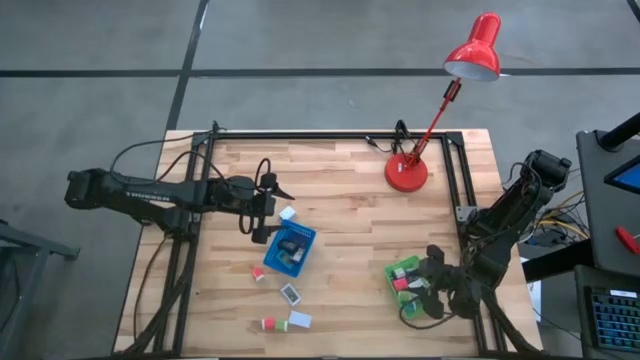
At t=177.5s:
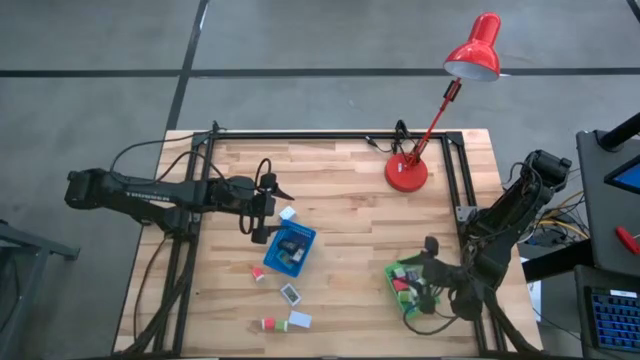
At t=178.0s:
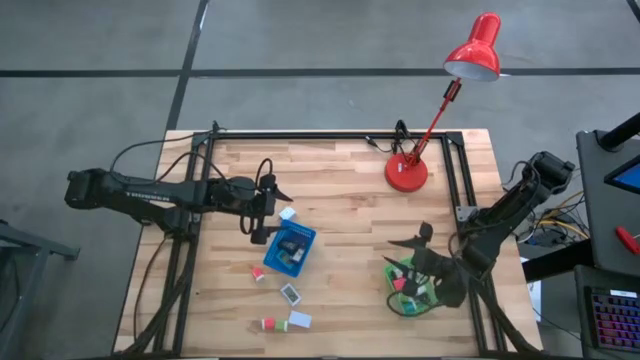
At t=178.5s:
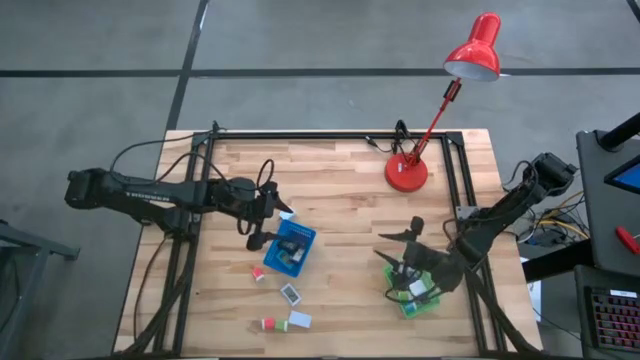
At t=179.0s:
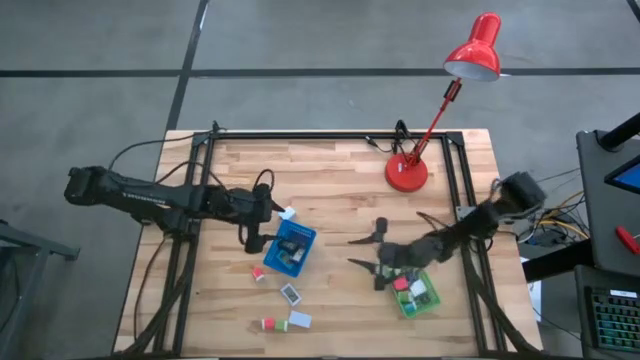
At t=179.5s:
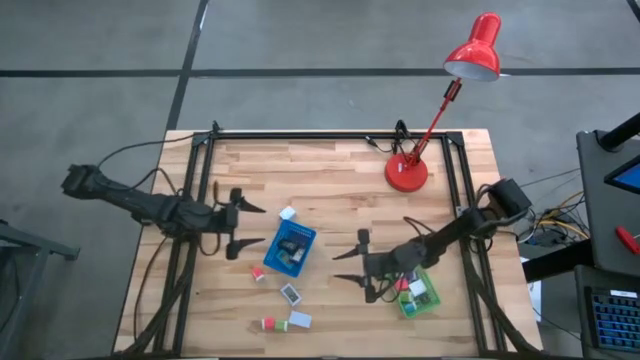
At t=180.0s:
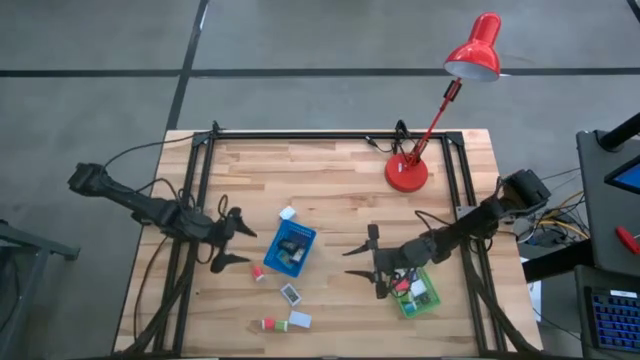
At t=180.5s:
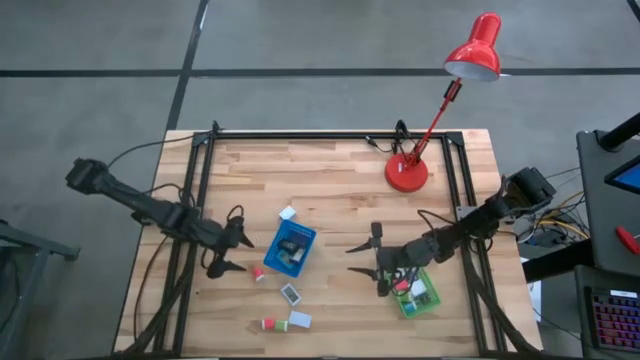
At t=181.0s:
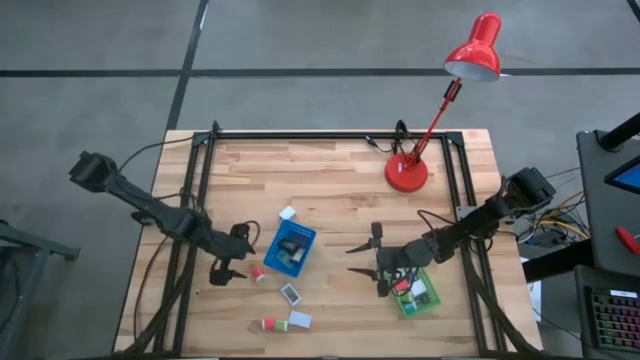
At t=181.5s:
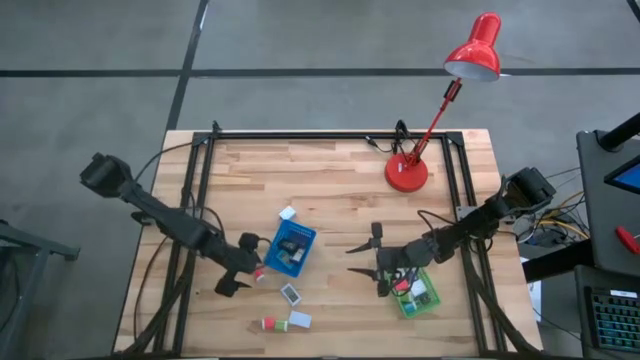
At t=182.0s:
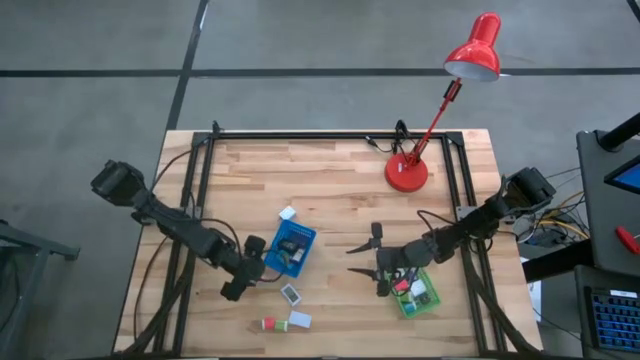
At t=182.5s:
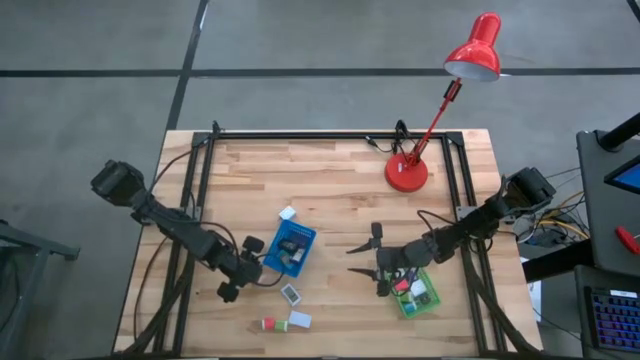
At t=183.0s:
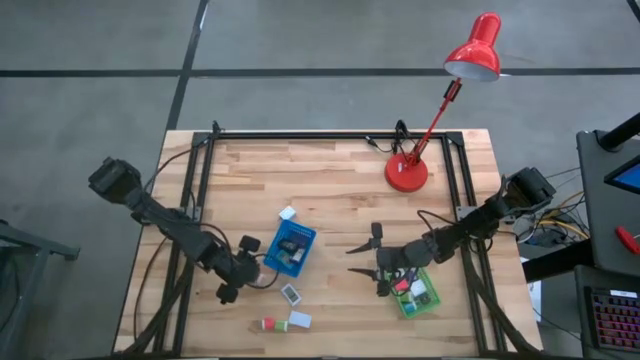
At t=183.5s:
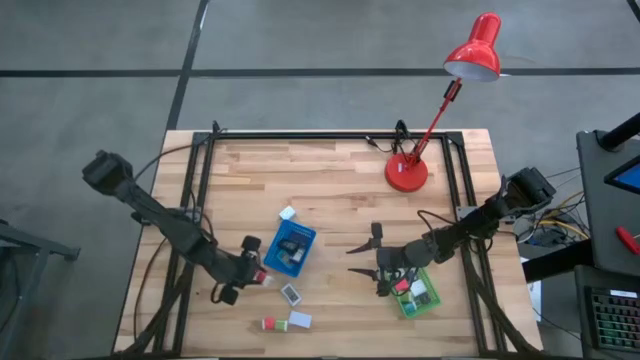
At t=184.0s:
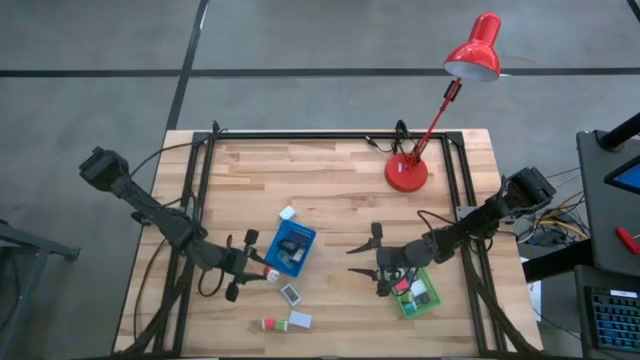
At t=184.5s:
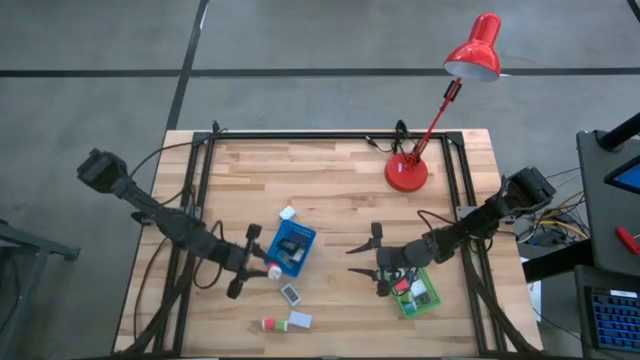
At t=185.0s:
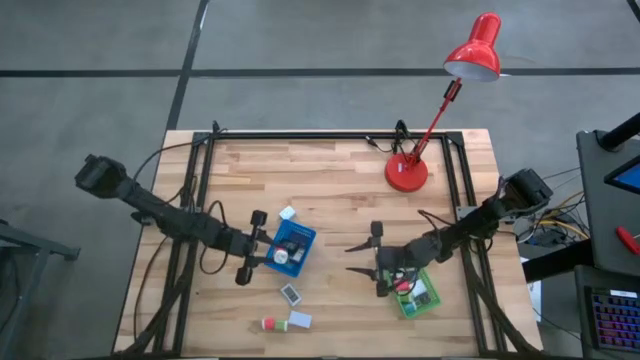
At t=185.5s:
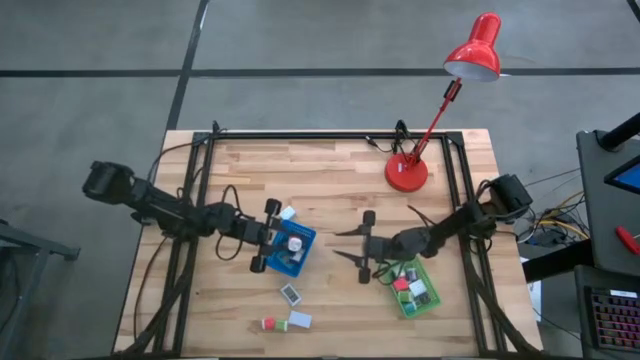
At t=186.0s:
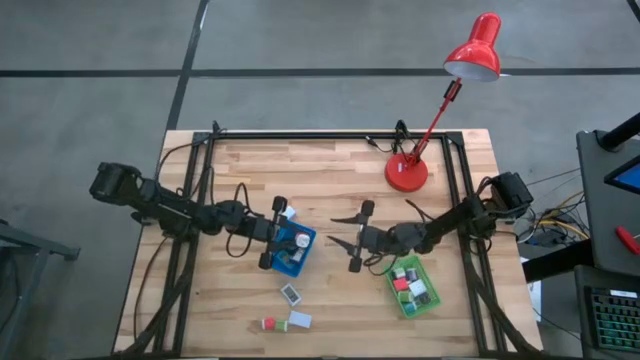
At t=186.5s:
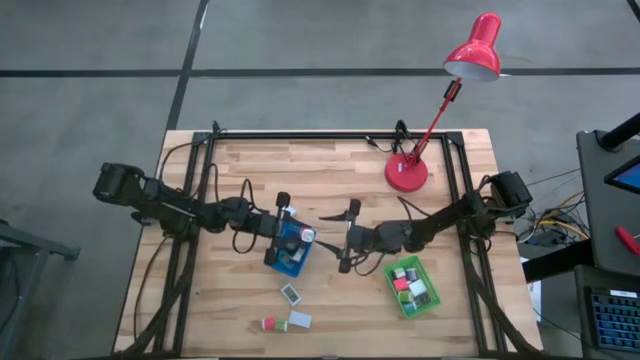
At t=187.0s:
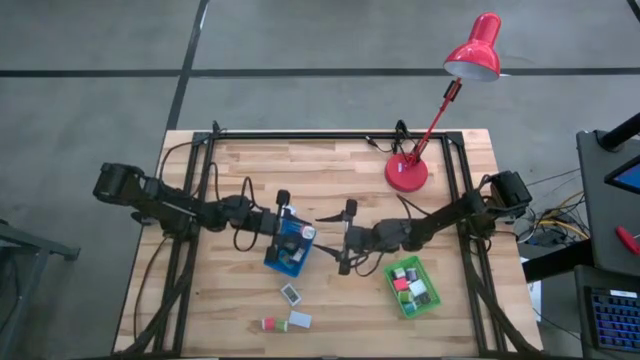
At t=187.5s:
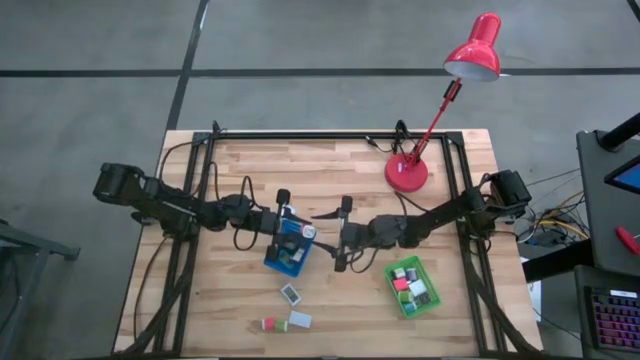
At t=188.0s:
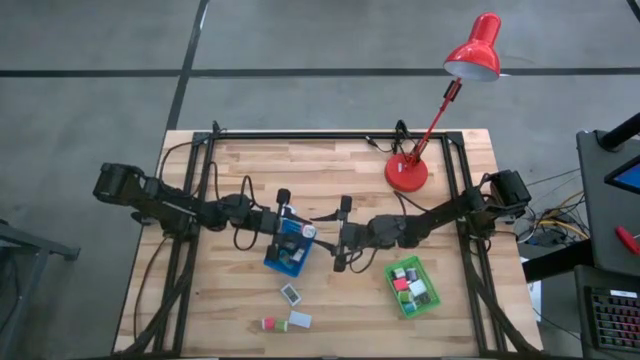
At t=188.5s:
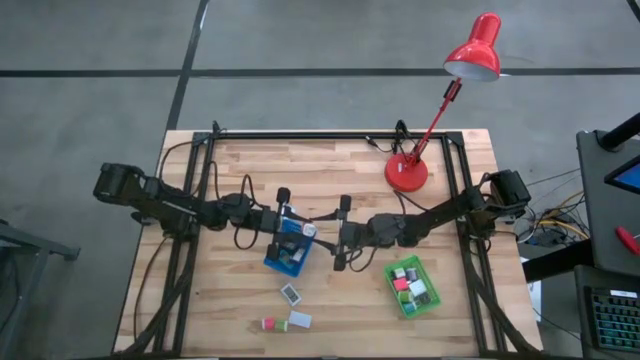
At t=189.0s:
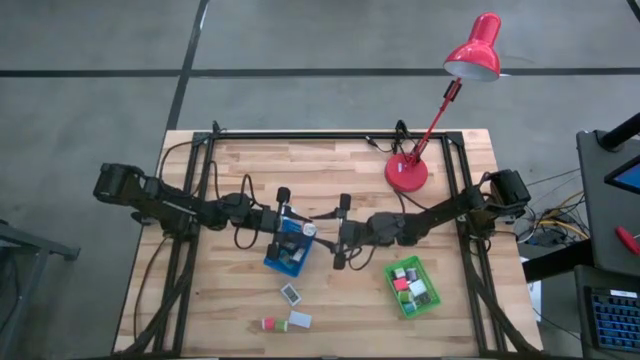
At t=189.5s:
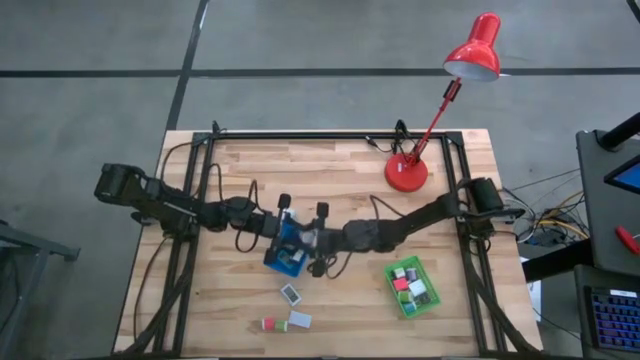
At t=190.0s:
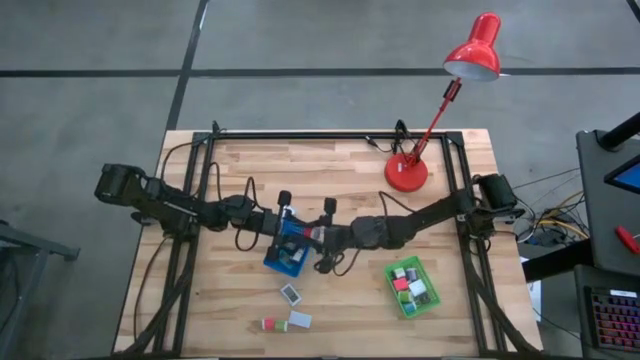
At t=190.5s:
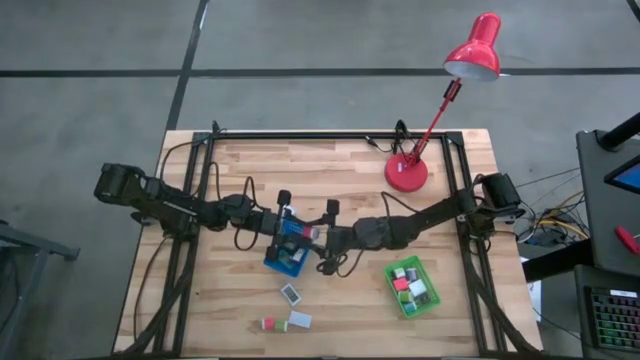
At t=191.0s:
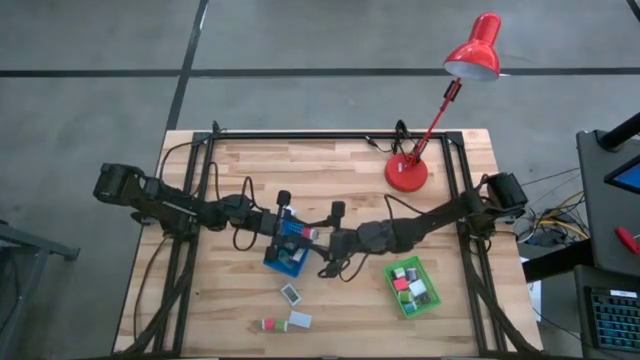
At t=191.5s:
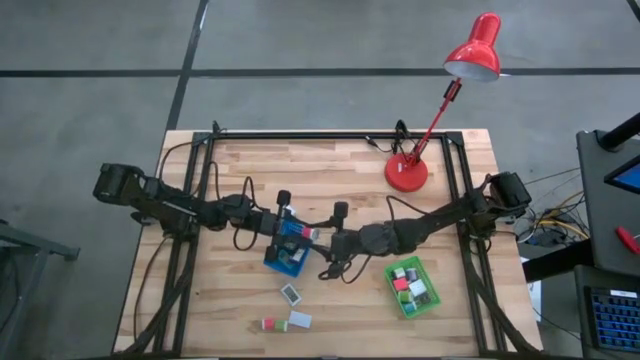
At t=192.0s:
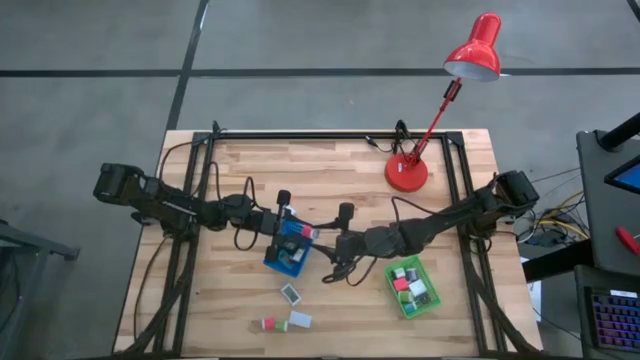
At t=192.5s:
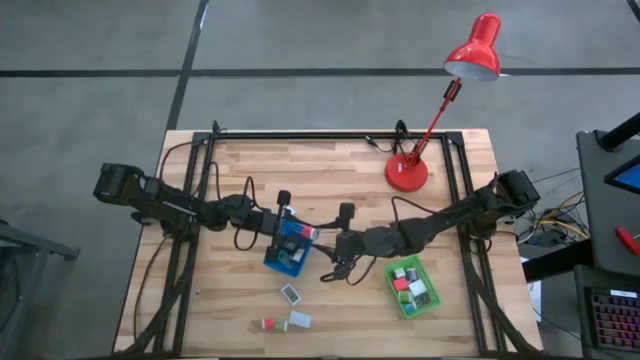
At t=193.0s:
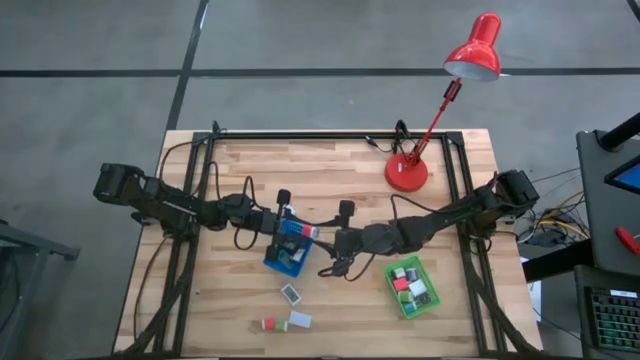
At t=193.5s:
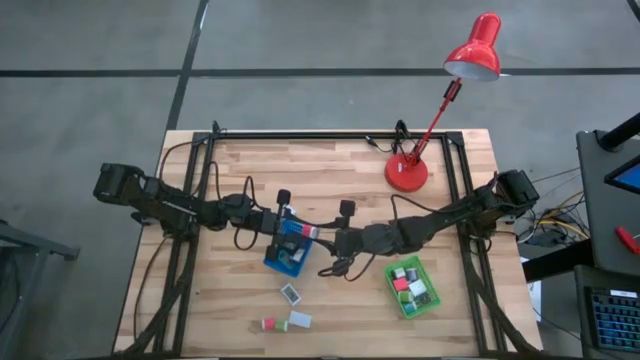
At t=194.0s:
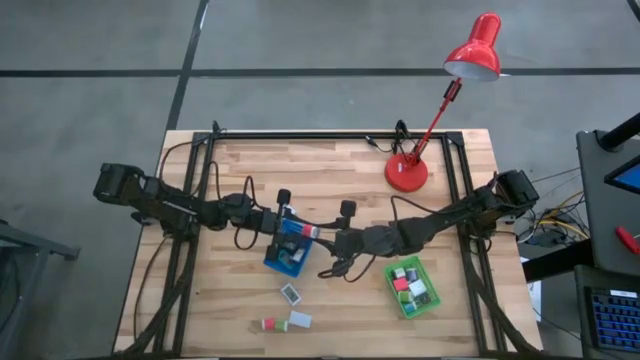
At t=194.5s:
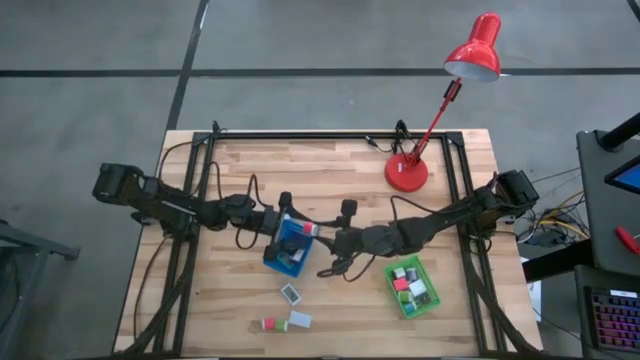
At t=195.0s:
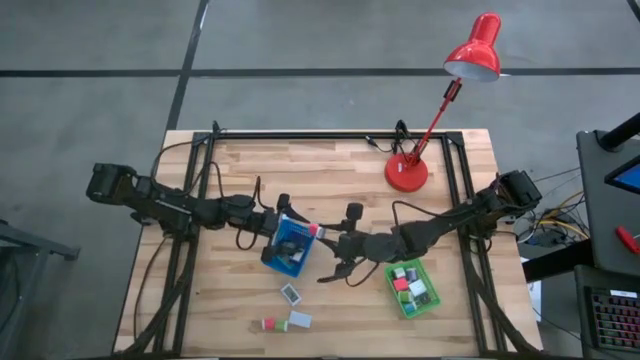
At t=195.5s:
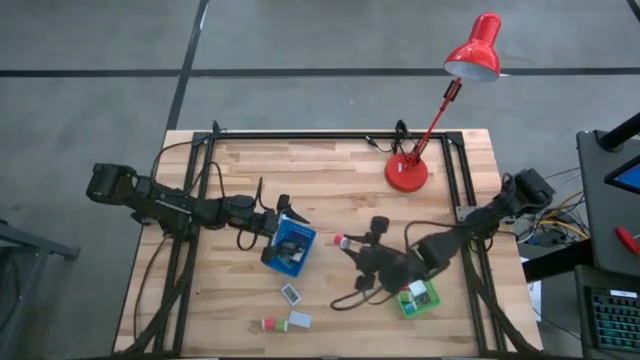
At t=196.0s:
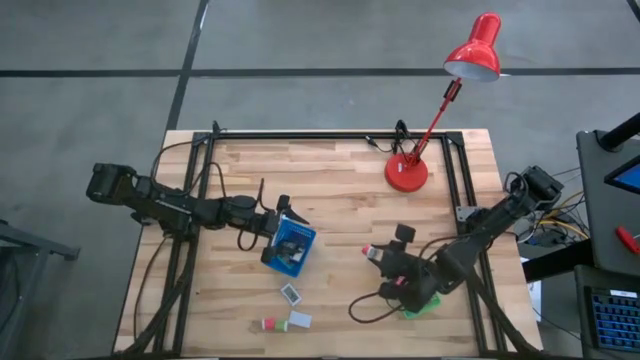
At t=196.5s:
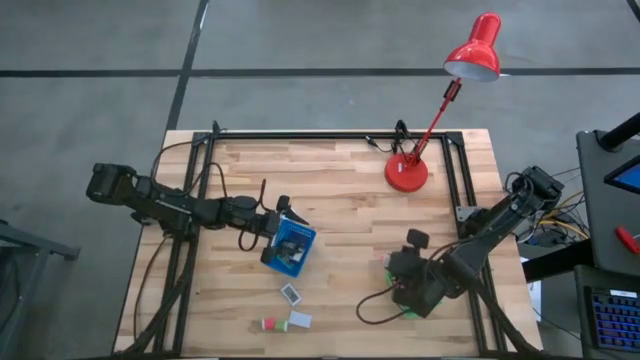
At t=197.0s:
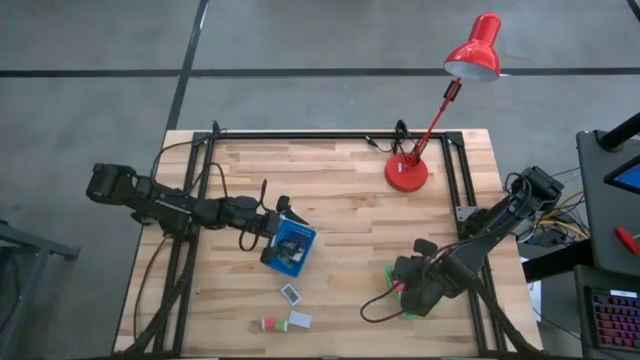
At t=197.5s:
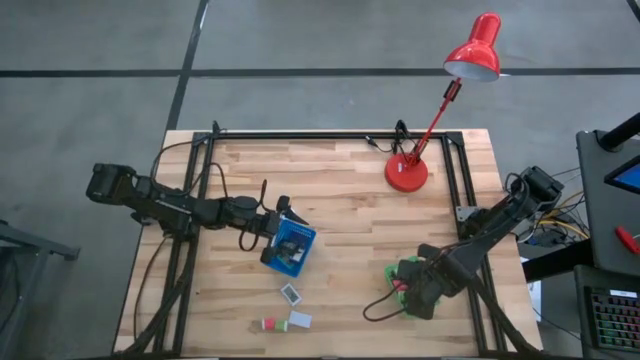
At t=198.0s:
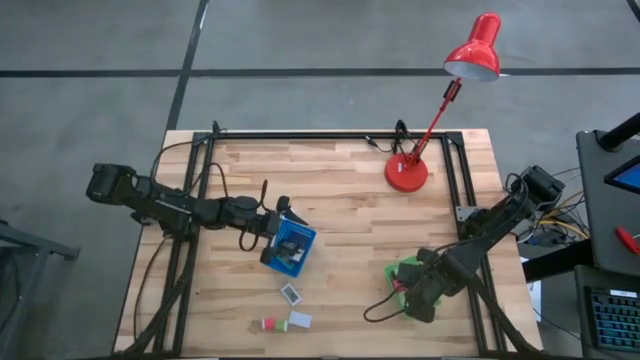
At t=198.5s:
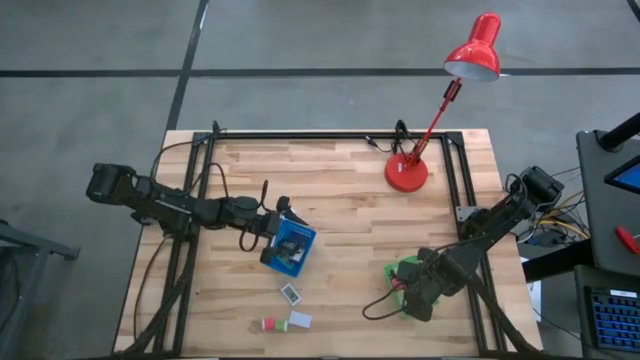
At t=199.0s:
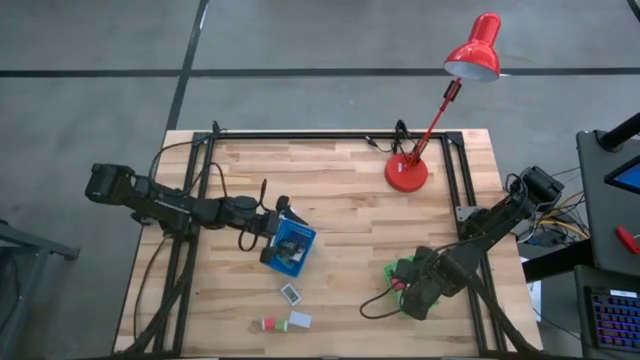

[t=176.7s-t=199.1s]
Task: Pick & Place Office items
Put the top pink white charger adapter into the green bin
